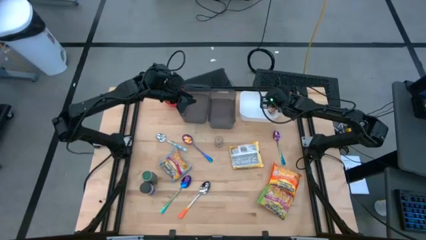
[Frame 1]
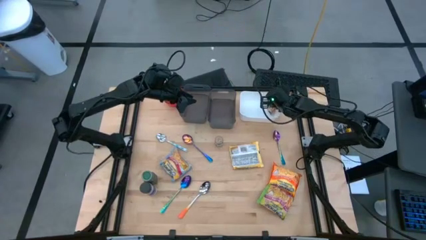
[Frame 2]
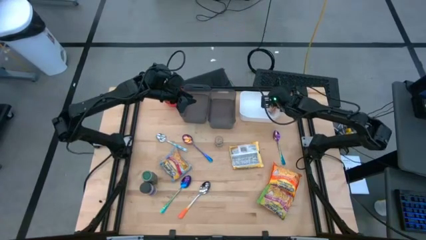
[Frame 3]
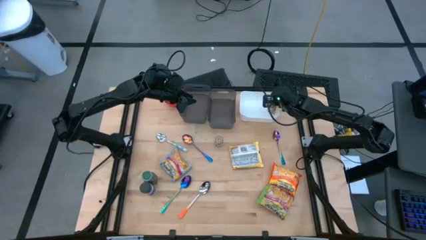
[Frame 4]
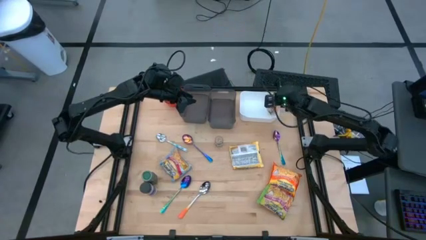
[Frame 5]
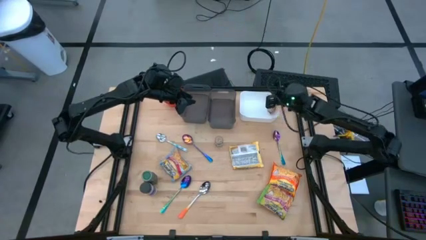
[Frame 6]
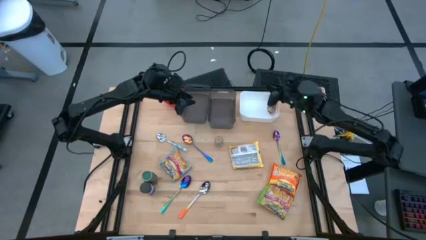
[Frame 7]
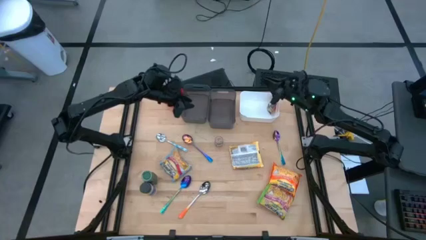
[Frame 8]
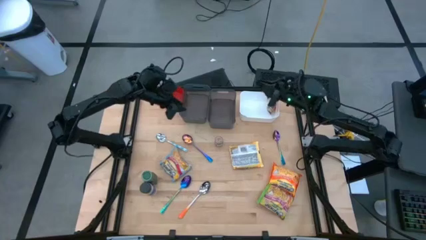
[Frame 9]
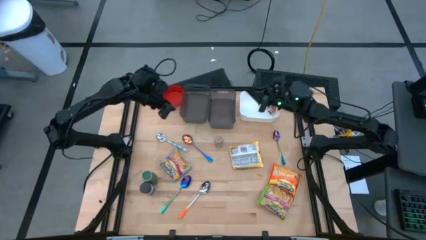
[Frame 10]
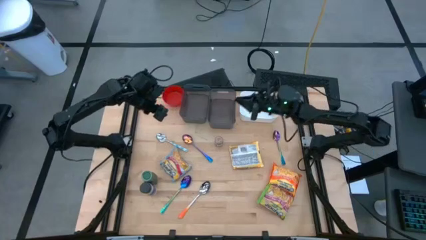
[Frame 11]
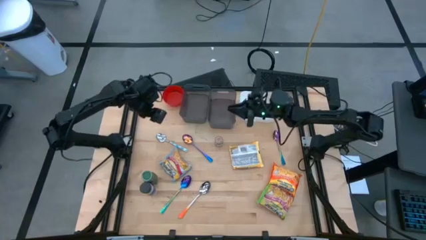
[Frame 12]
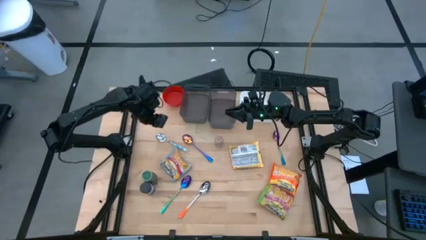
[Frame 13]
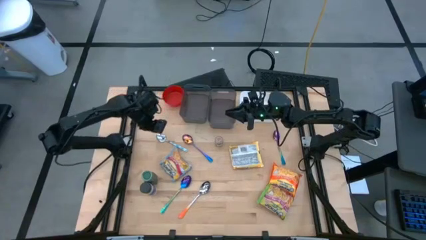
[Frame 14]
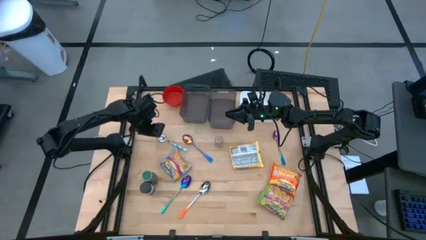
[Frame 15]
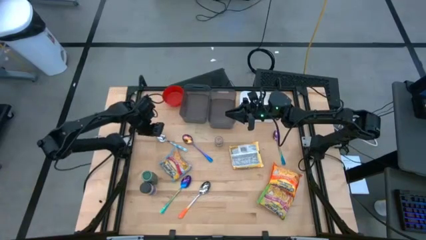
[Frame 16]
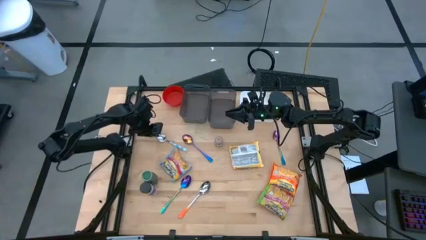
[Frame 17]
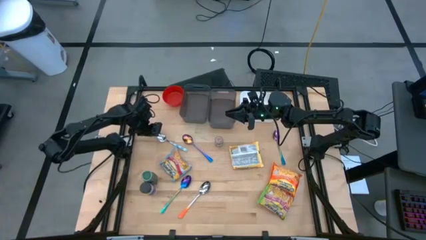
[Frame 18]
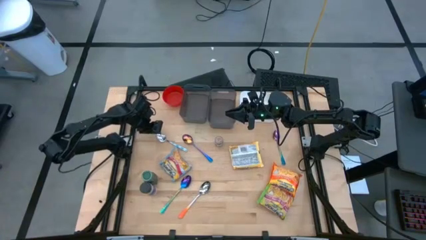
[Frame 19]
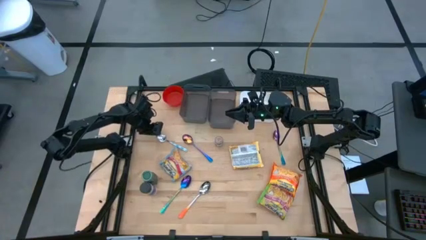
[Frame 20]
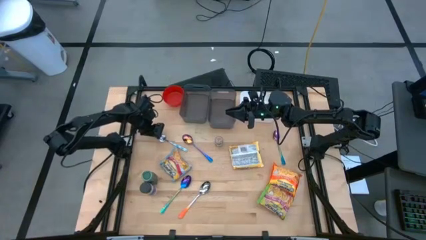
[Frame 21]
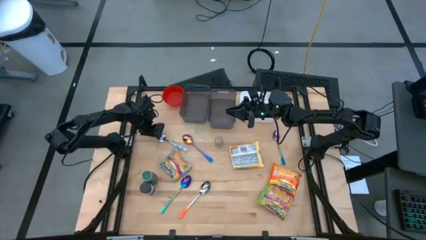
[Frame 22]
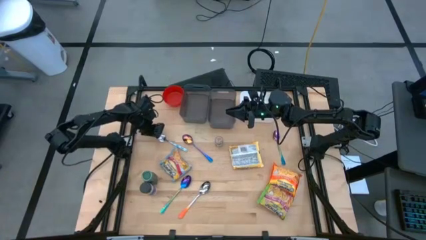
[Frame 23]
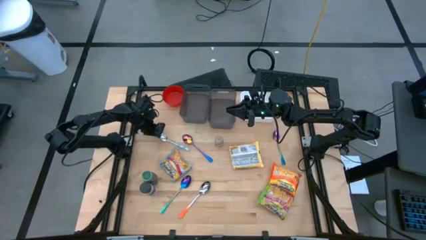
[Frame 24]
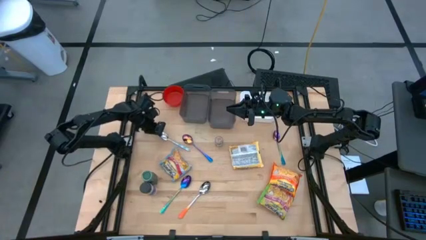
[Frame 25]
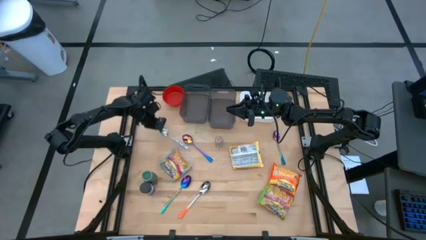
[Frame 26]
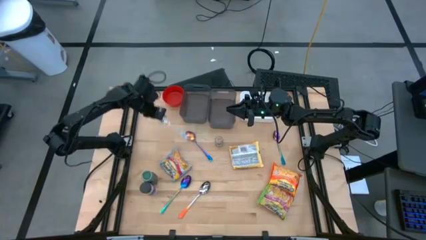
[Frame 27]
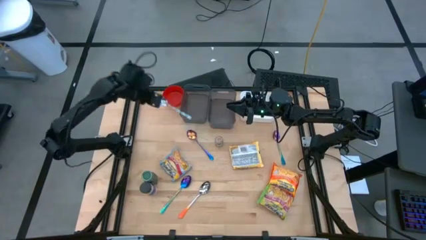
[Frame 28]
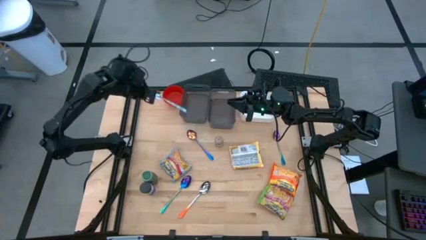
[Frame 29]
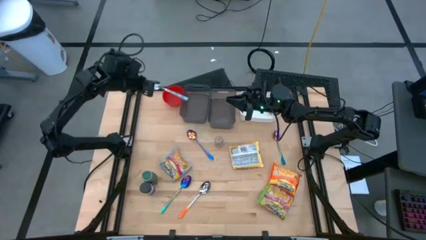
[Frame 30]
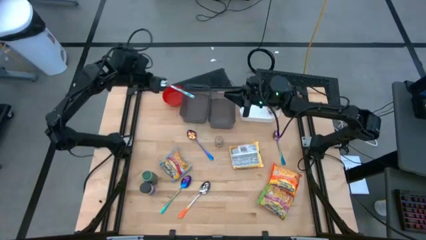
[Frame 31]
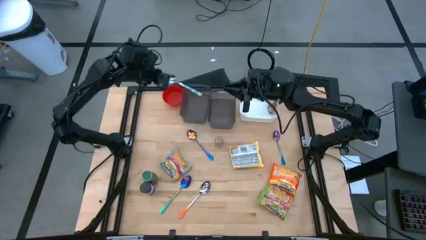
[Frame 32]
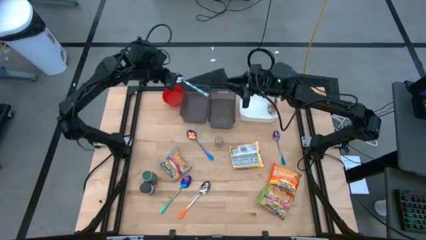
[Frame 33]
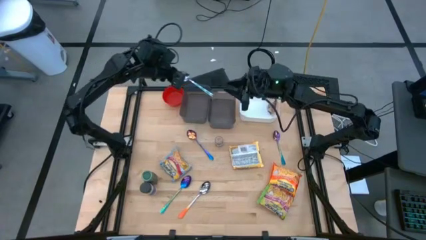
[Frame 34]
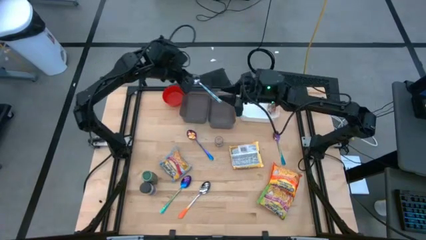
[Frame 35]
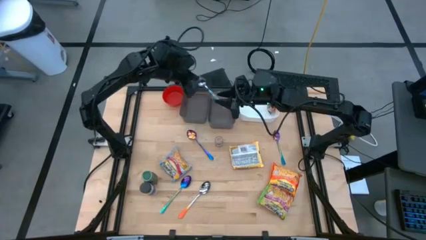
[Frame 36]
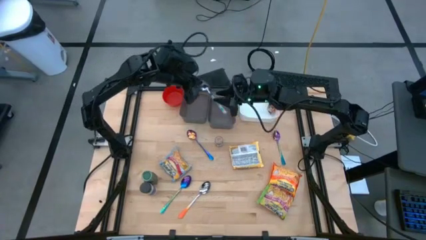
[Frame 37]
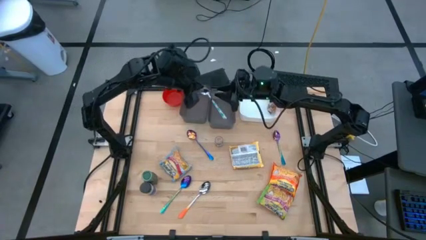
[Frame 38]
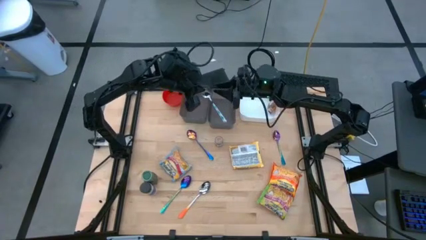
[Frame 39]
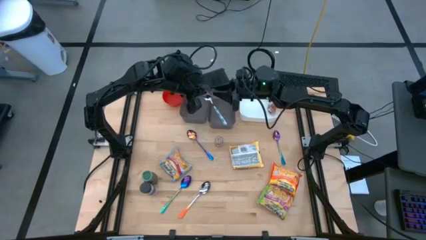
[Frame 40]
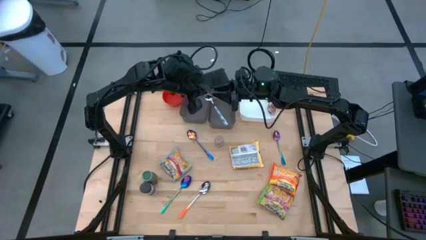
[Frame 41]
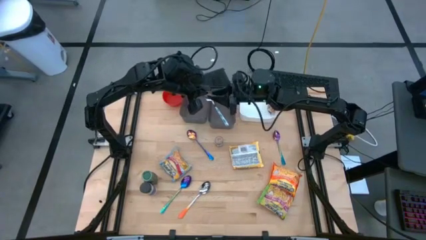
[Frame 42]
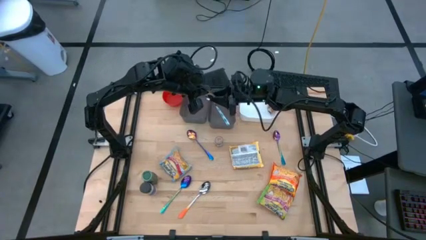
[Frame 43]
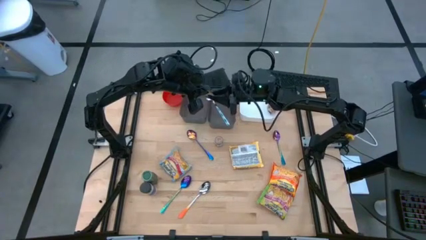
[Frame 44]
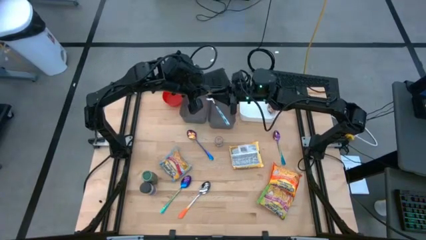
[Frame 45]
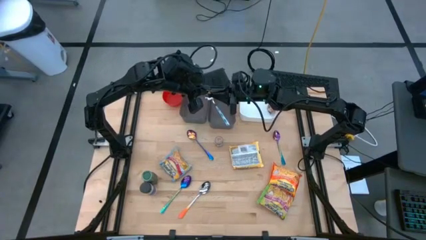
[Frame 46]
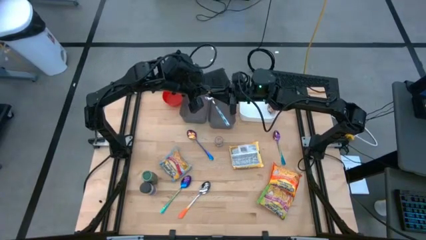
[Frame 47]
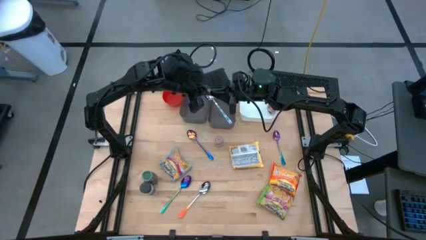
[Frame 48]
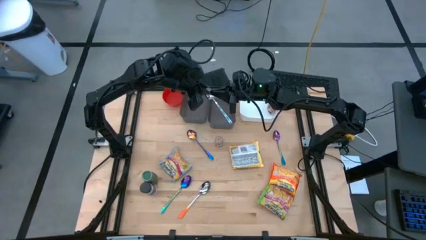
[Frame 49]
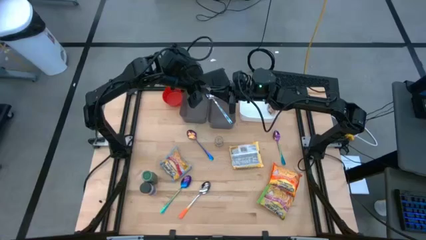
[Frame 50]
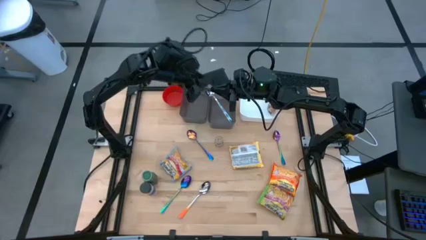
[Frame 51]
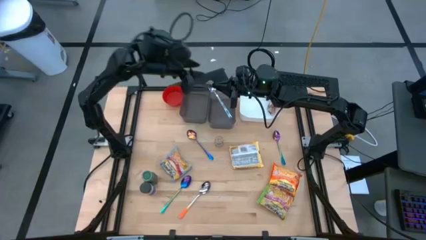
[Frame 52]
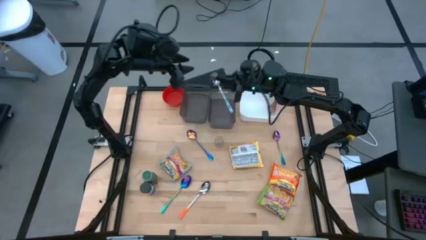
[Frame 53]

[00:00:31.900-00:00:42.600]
Task: Pick & Place Food Item
Put the white and blue spoon into the left black bin
